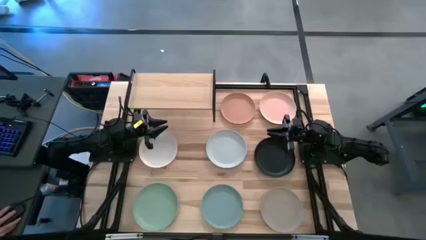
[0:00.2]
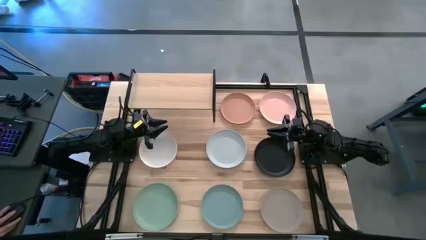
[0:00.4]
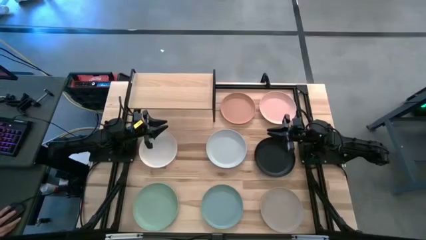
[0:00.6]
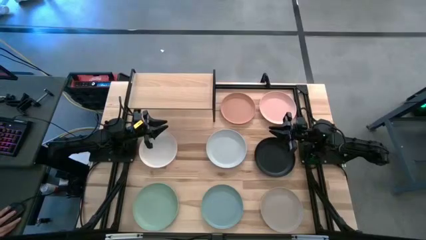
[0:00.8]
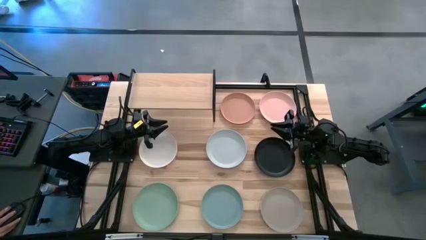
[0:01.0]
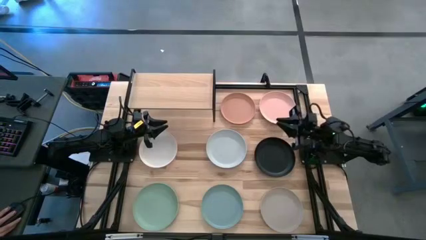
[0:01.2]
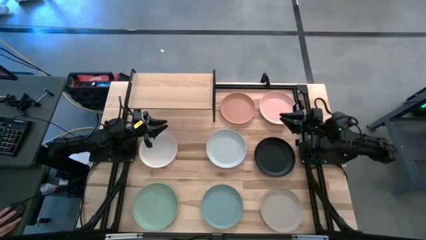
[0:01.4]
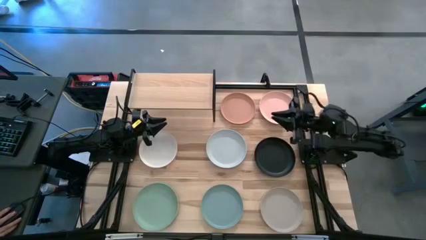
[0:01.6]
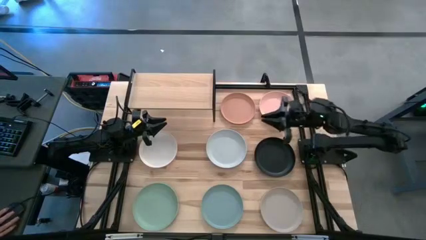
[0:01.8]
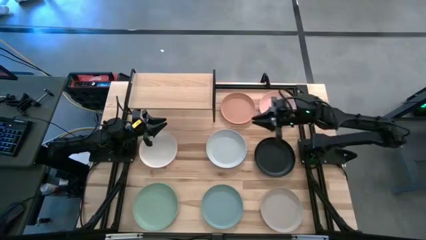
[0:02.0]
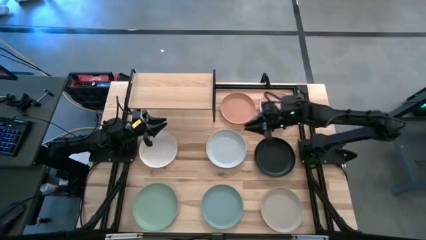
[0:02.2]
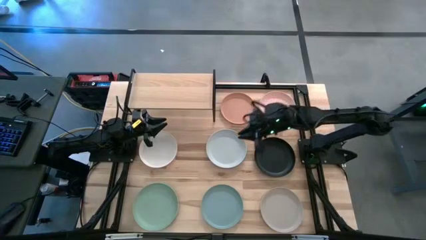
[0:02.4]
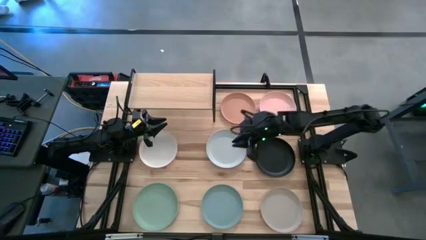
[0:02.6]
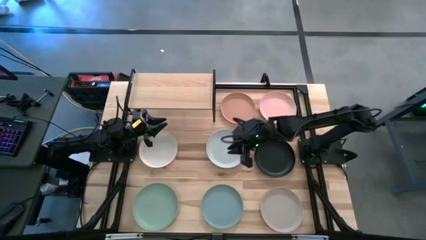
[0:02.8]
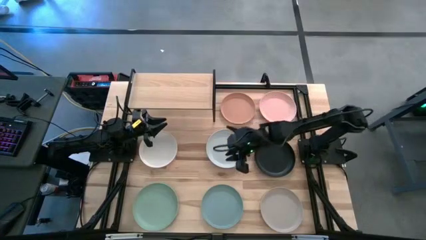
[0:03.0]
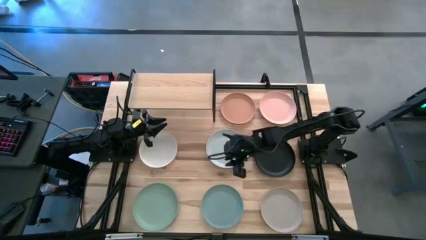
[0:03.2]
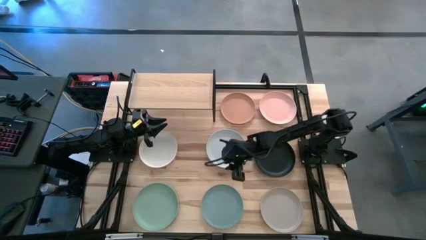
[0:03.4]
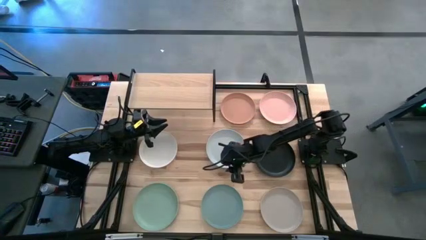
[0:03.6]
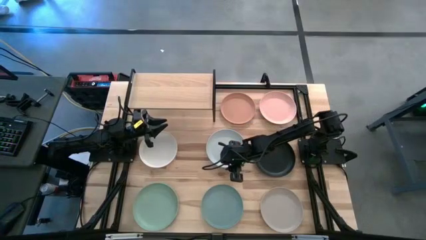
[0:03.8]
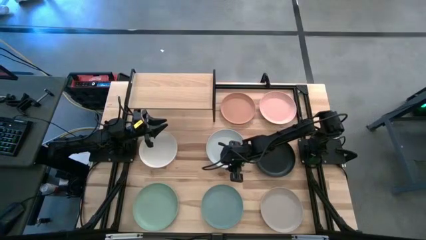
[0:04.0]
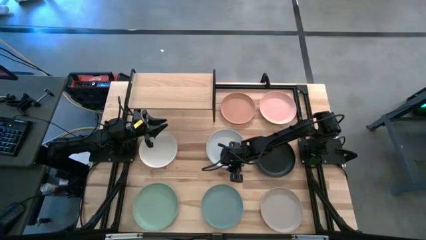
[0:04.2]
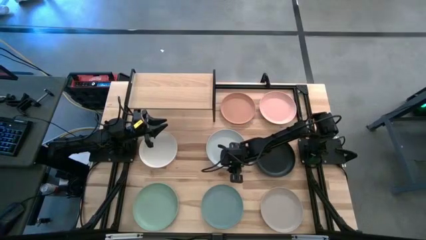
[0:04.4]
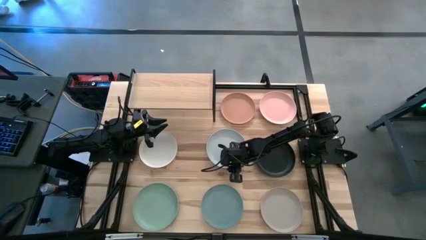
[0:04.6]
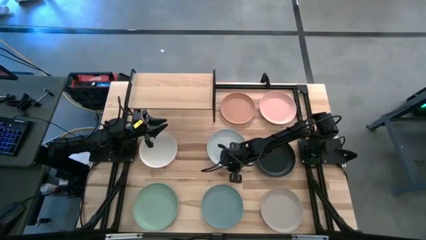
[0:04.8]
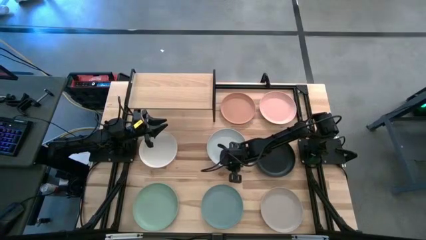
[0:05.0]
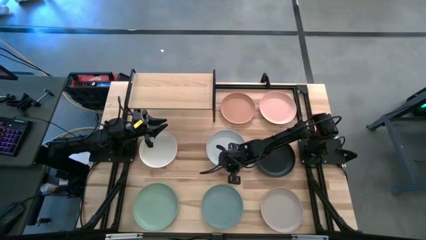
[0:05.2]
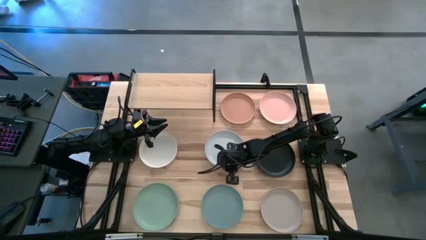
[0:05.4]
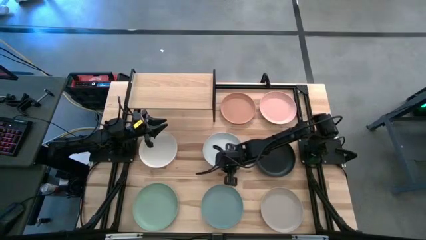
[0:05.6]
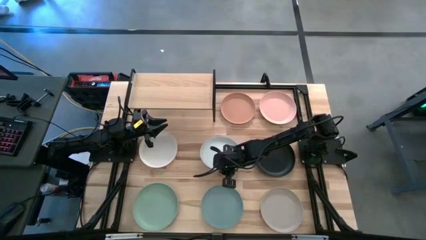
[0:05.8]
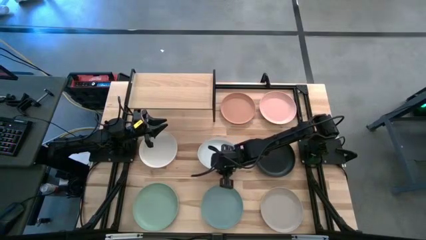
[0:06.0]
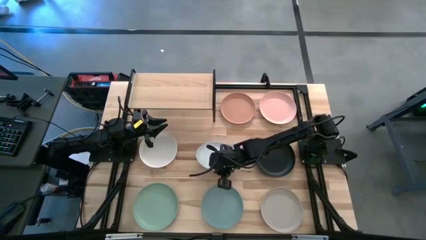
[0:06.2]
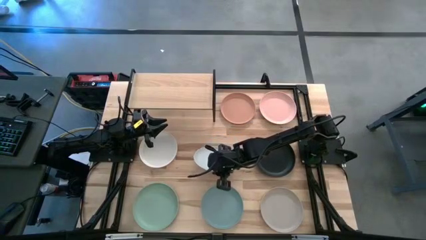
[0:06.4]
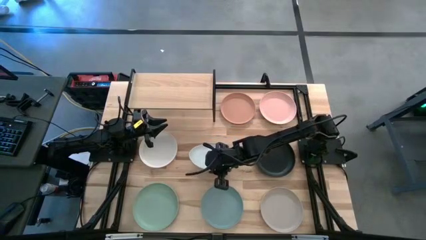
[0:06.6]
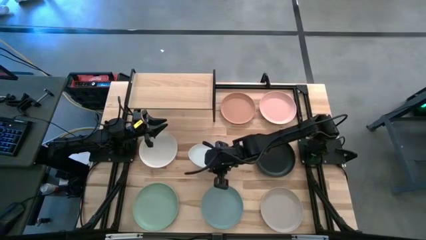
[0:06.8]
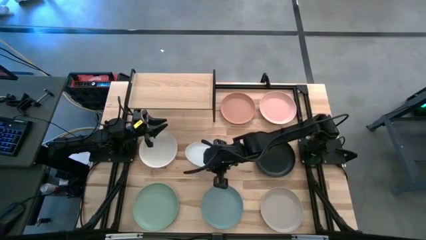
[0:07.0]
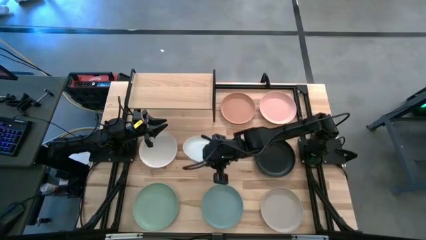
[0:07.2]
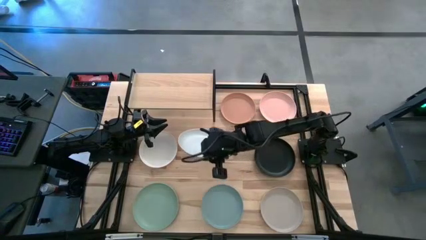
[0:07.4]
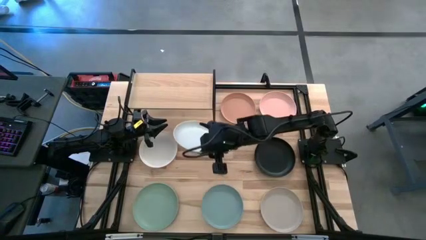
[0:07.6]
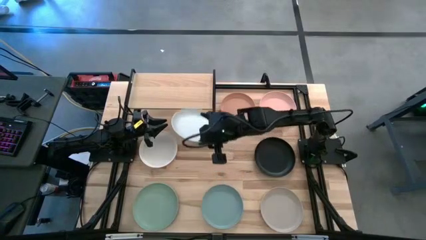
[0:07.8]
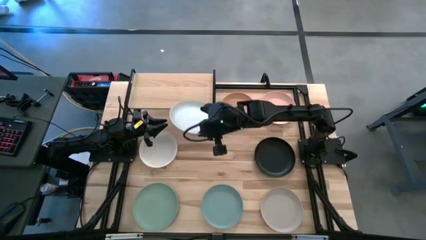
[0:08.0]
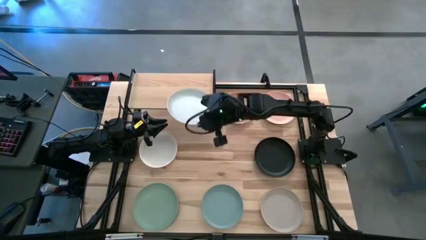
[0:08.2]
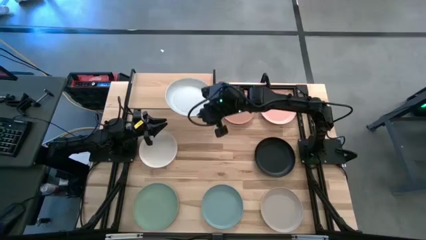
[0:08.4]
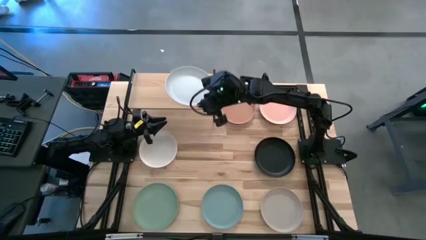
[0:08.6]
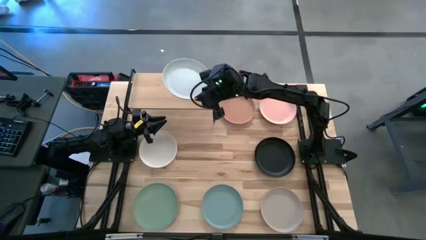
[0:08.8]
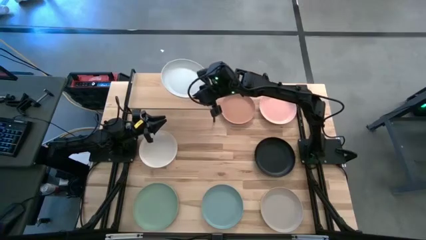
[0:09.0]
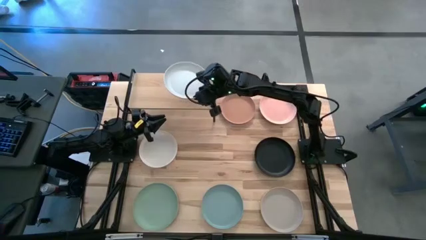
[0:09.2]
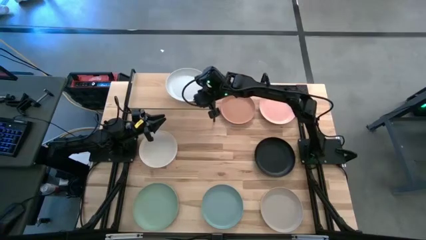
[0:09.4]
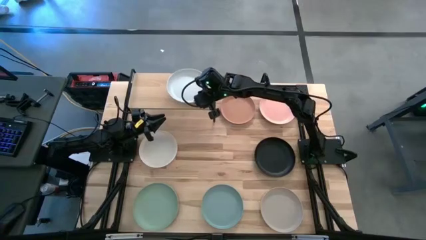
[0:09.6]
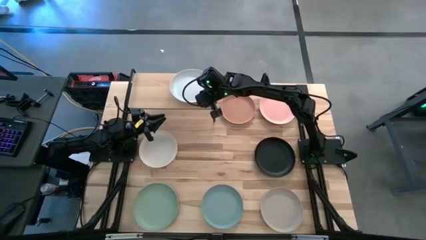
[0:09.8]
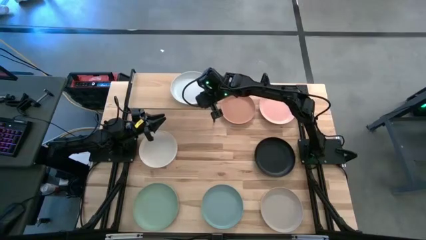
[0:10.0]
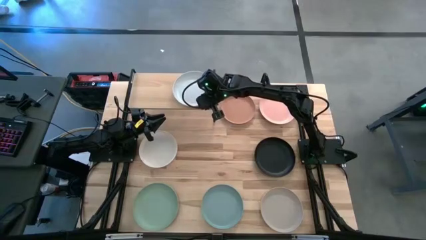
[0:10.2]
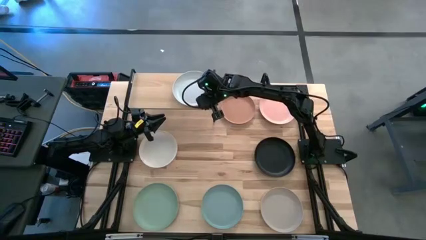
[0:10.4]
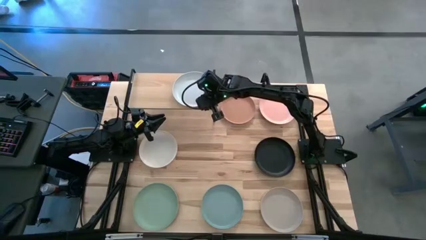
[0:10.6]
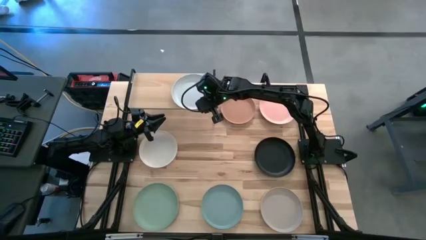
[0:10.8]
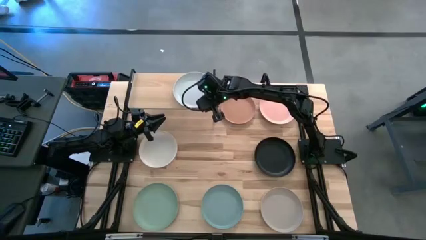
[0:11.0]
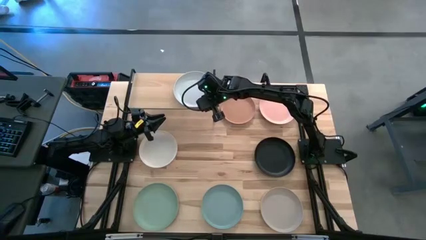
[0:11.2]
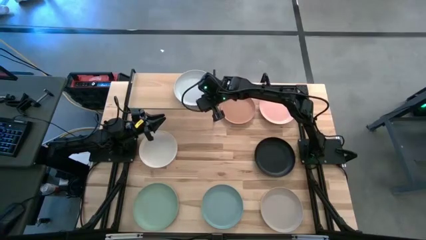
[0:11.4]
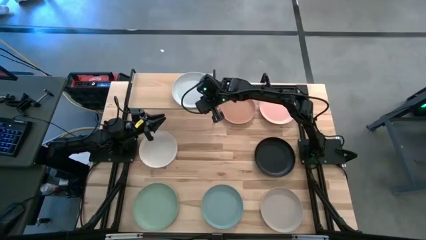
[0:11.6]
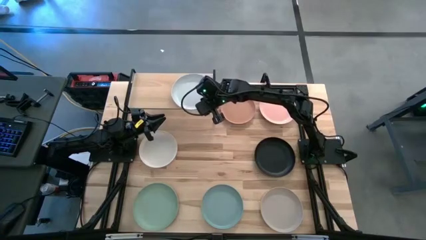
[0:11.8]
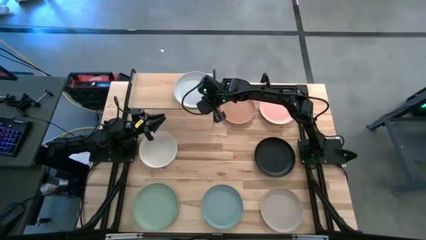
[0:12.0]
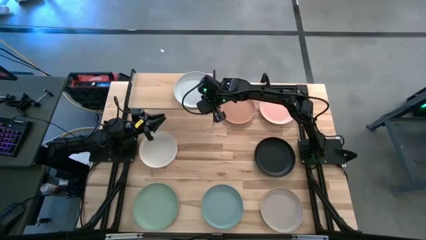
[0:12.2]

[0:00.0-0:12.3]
Task: Place and stack plates onto a shelf
Put the light blue plate on the shelf
